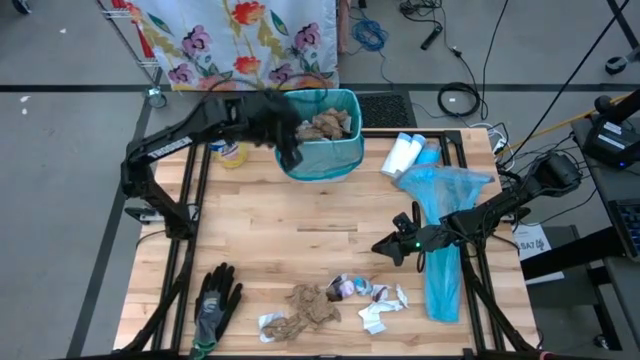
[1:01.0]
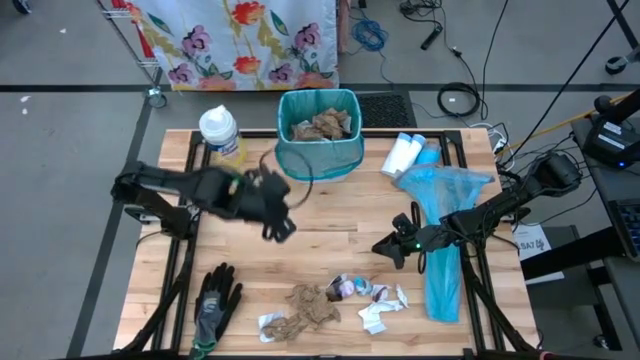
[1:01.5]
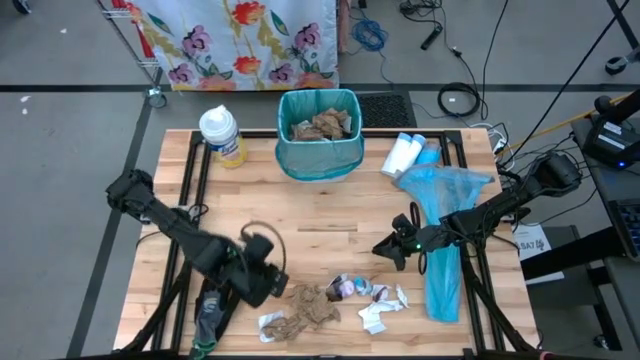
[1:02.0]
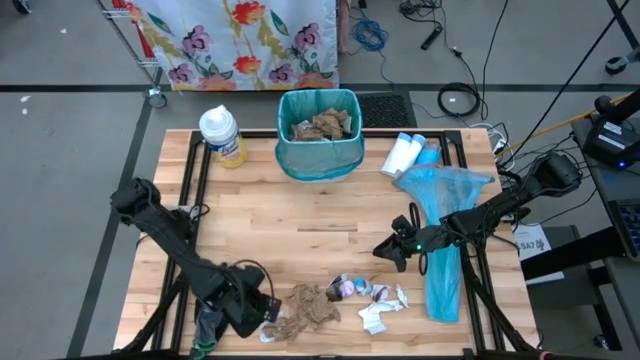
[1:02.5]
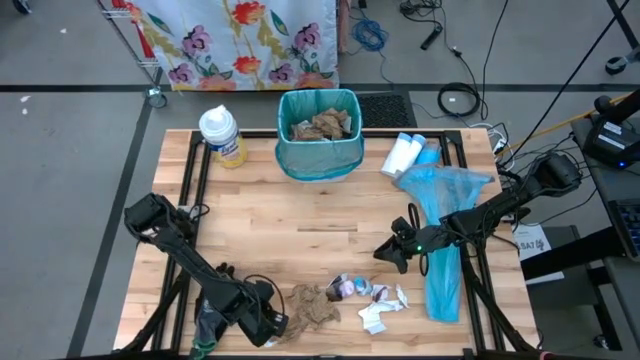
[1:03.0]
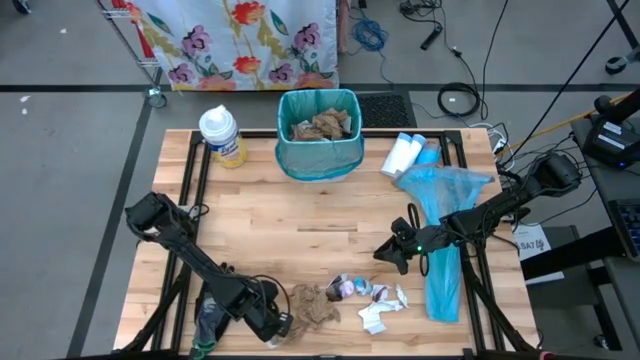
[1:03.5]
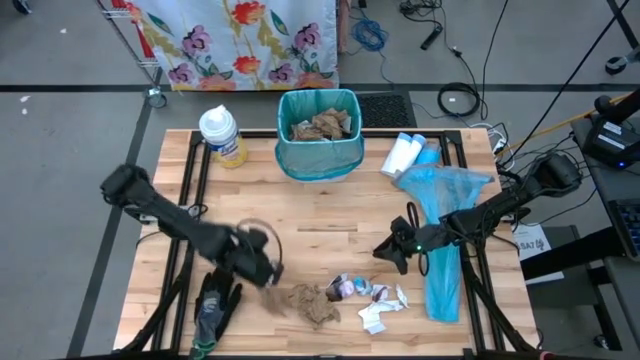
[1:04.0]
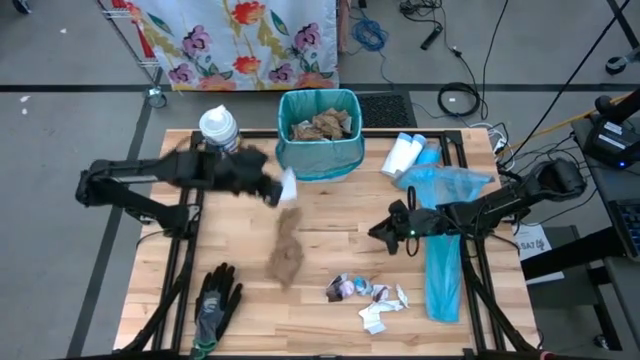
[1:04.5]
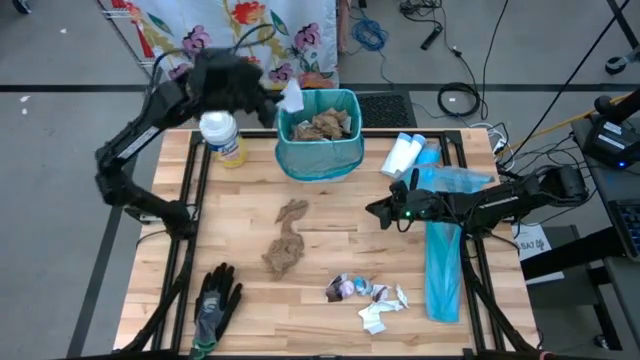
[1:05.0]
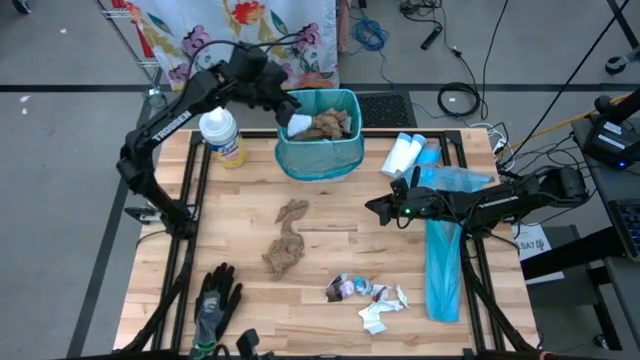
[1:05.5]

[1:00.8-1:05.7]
Task: place trash/remove bag and relplace
Put the white paper into the white trash bin

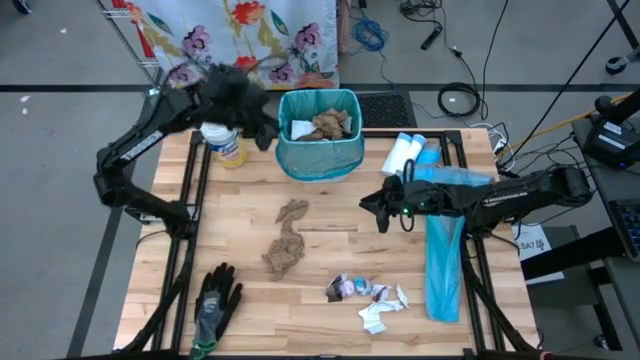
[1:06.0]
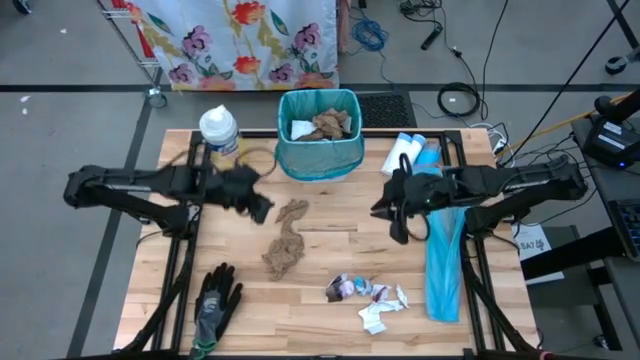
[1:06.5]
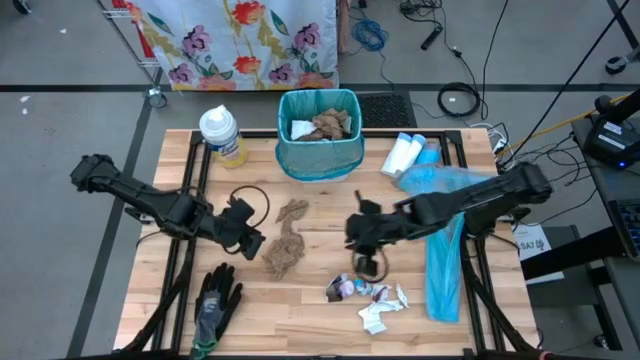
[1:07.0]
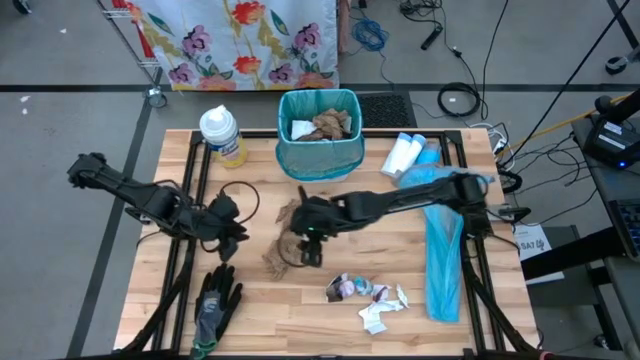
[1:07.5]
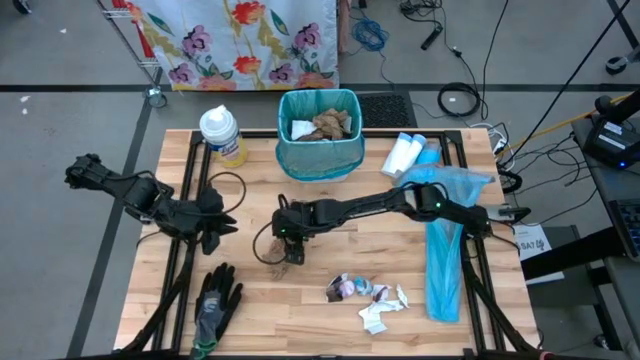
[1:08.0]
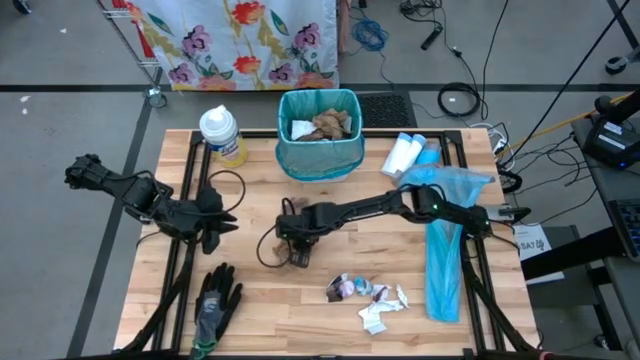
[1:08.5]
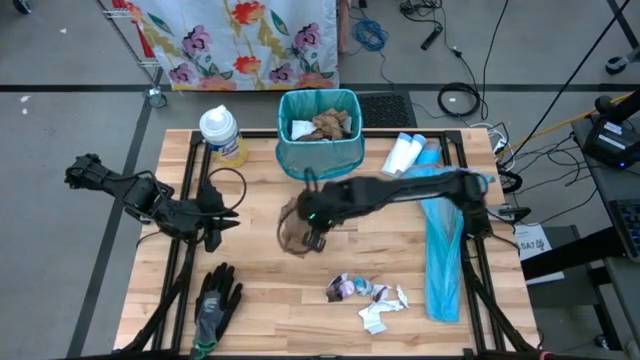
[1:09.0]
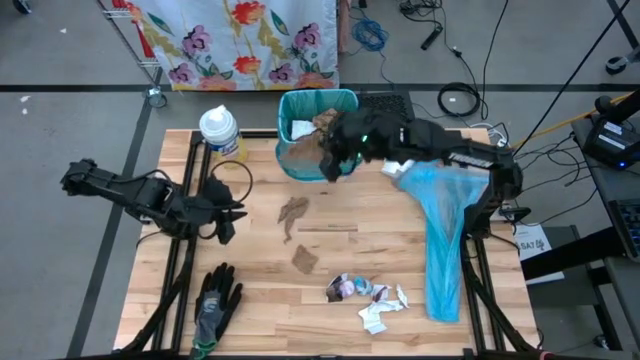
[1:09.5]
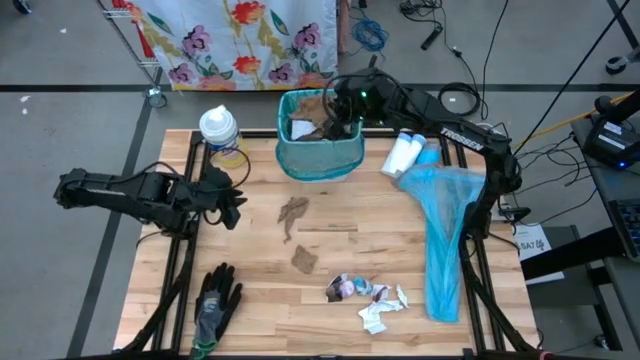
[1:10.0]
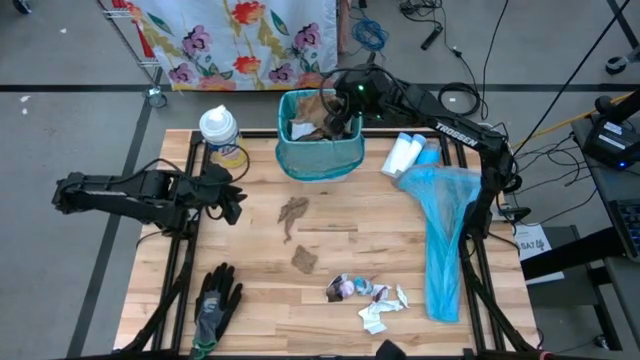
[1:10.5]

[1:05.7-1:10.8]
Put the brown napkin into the white trash bin

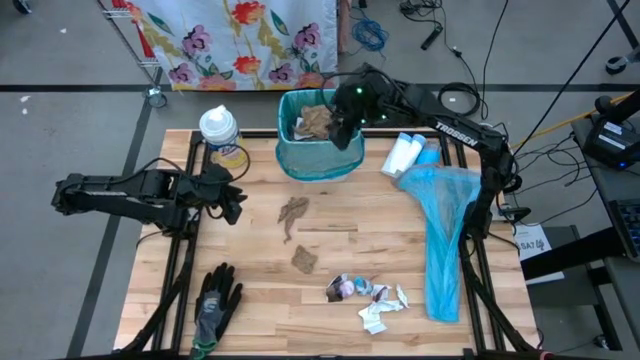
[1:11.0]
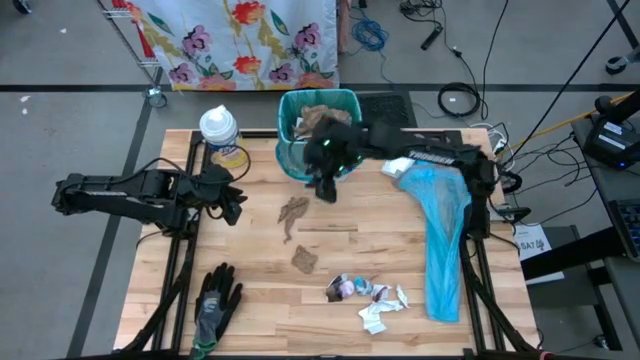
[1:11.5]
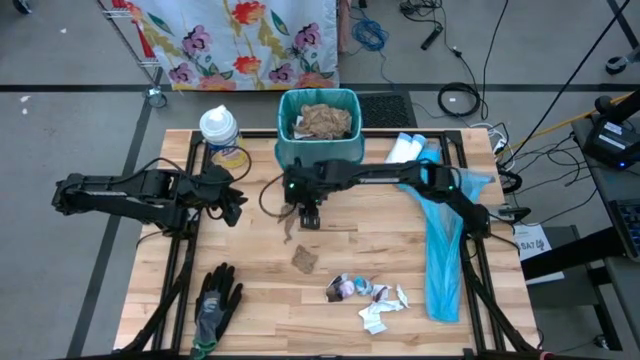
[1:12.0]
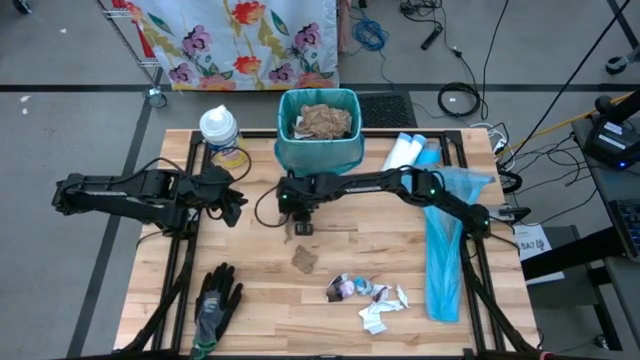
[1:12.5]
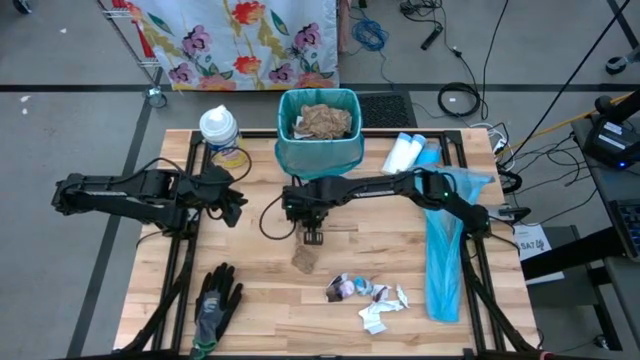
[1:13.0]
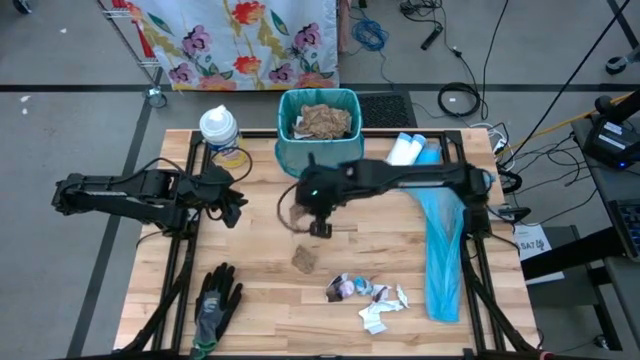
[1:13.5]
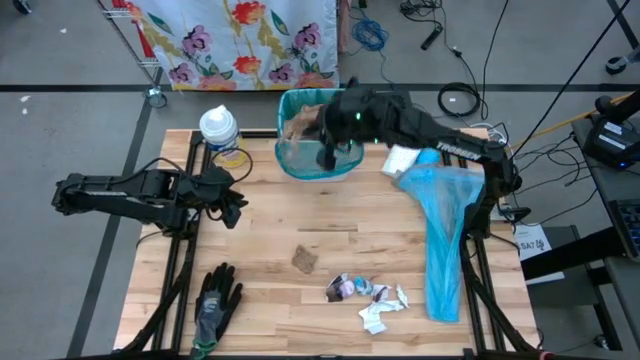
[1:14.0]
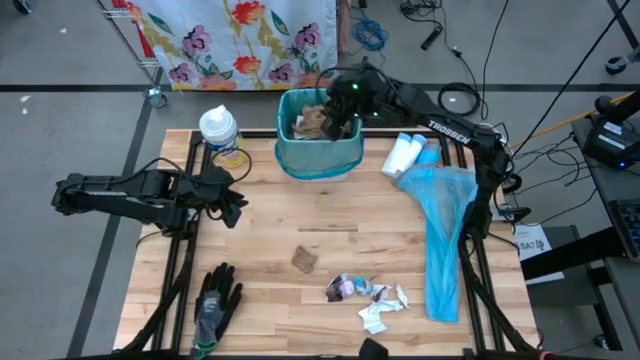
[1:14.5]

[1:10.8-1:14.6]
Put the brown napkin into the white trash bin

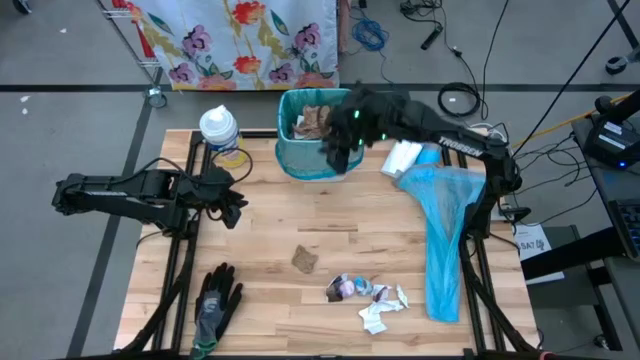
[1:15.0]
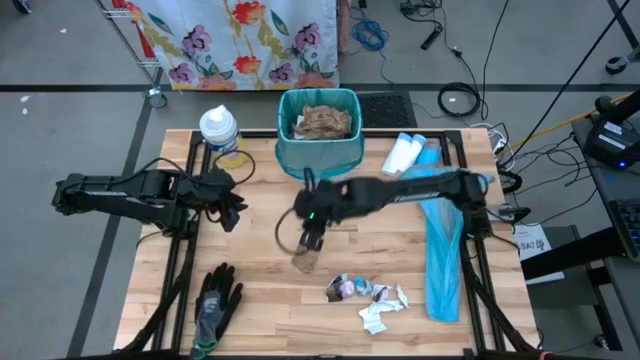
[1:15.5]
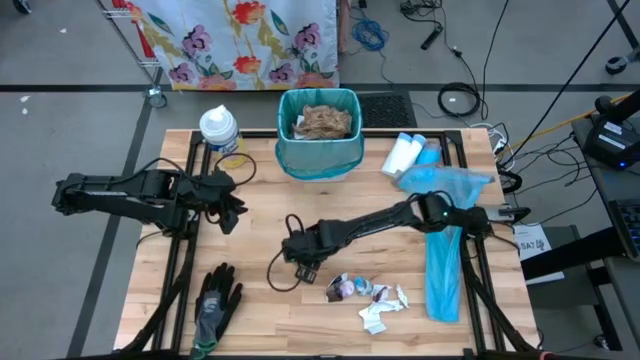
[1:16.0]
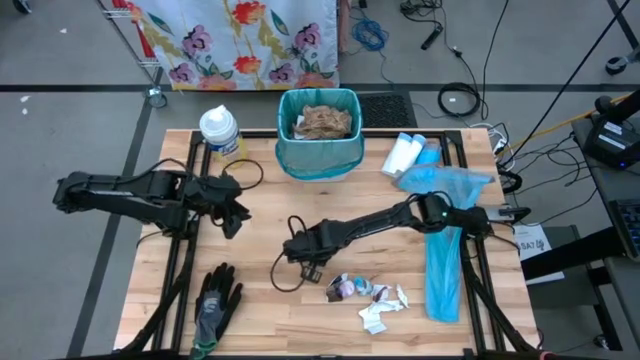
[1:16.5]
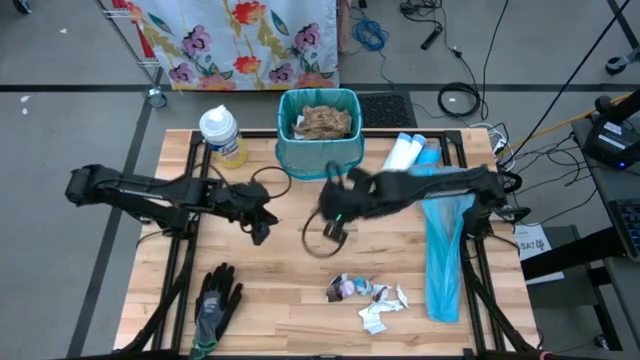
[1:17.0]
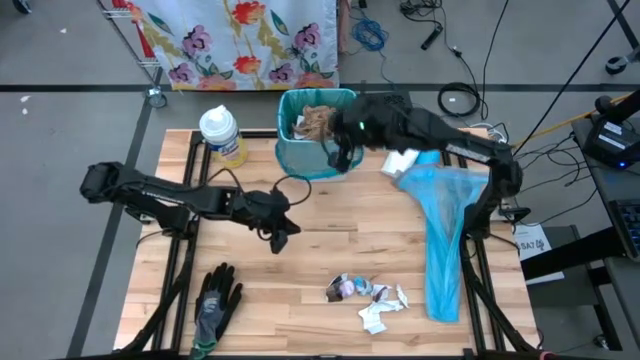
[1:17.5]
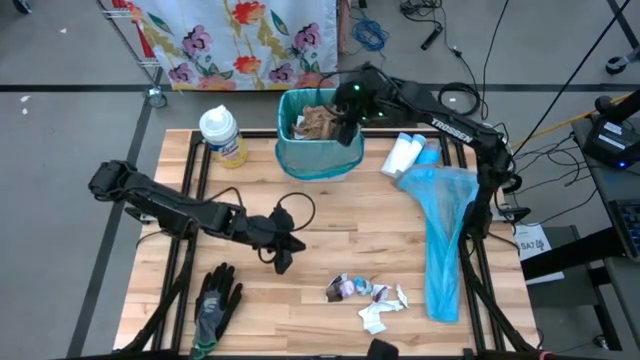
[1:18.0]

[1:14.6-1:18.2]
Put the brown napkin into the white trash bin

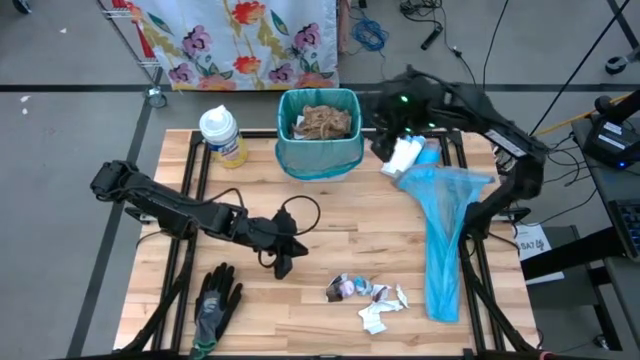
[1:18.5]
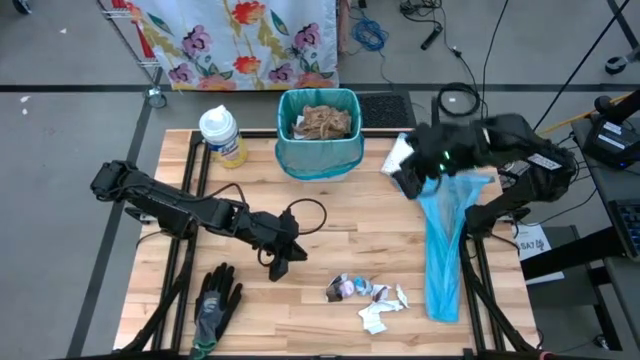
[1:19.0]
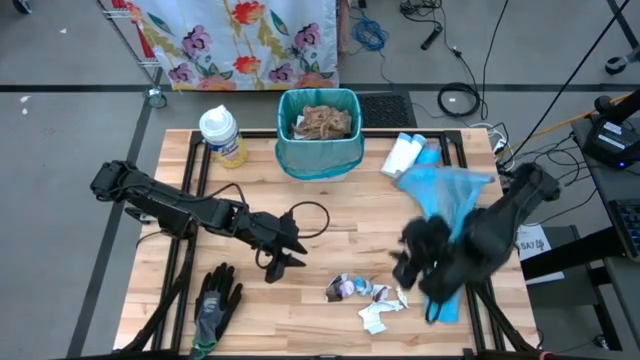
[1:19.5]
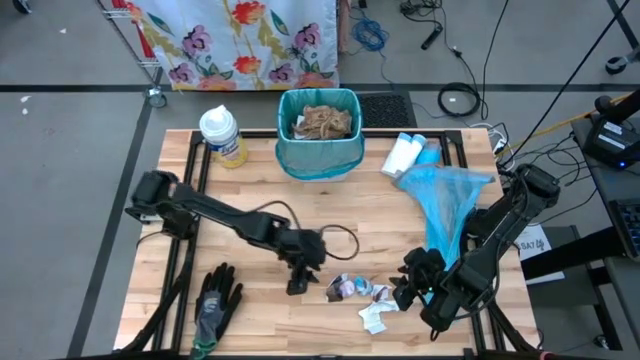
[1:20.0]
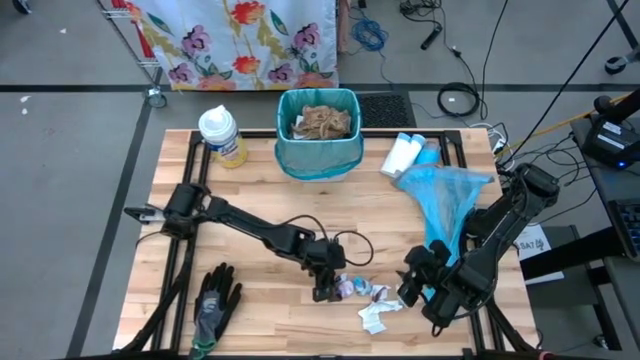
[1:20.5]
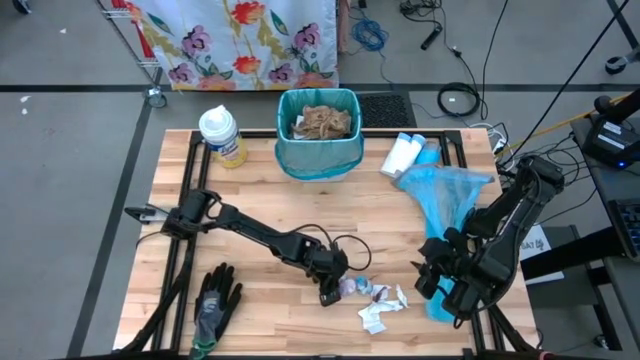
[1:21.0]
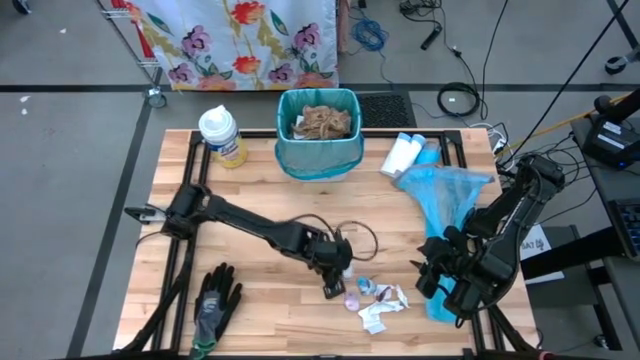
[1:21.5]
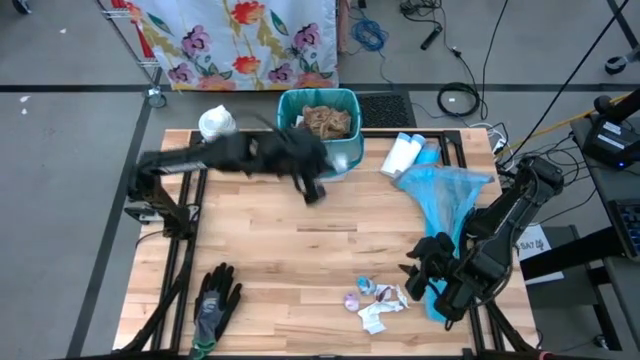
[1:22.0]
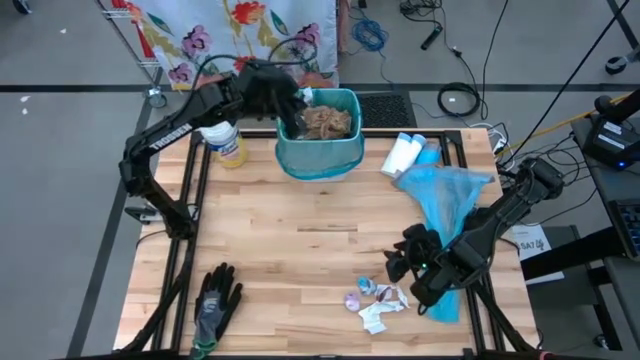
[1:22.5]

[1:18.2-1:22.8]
Put the black-white paper into the white trash bin
